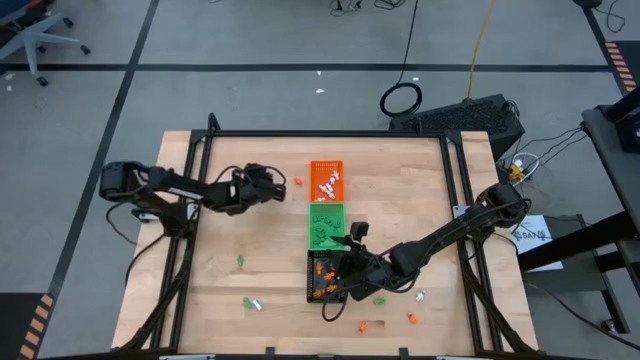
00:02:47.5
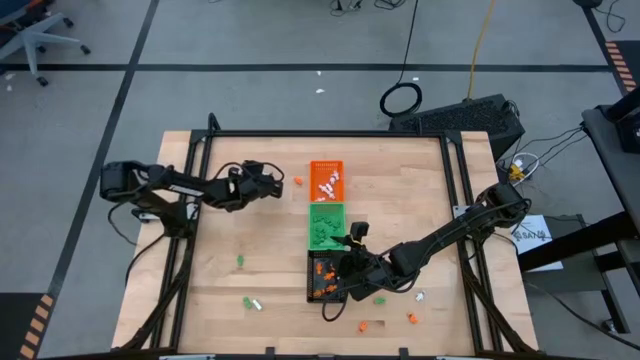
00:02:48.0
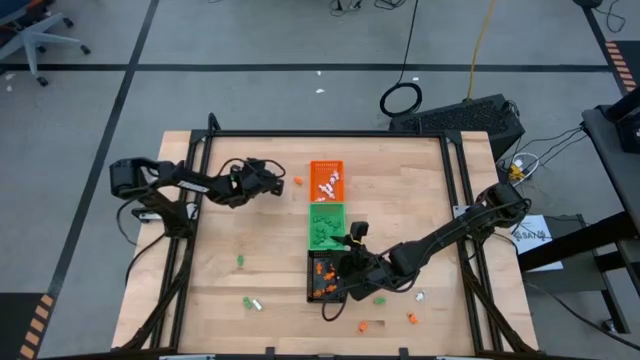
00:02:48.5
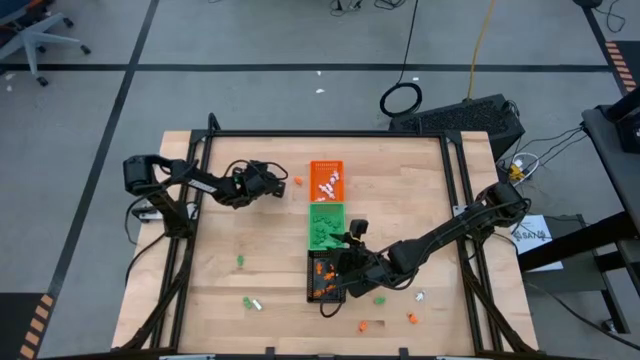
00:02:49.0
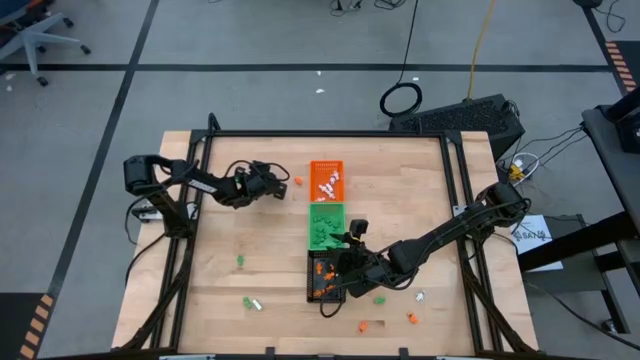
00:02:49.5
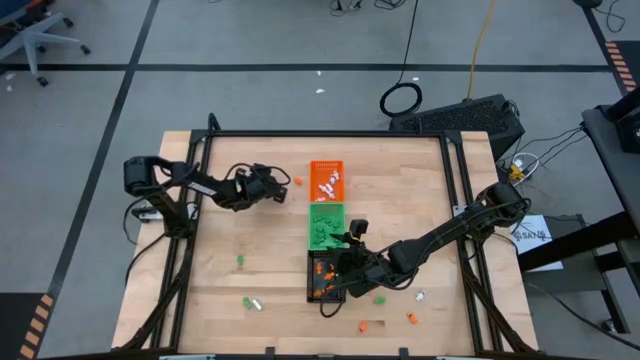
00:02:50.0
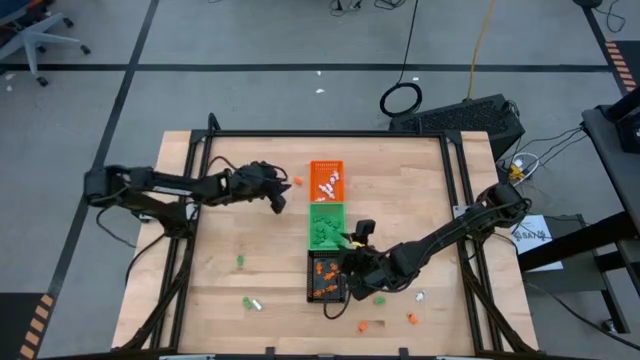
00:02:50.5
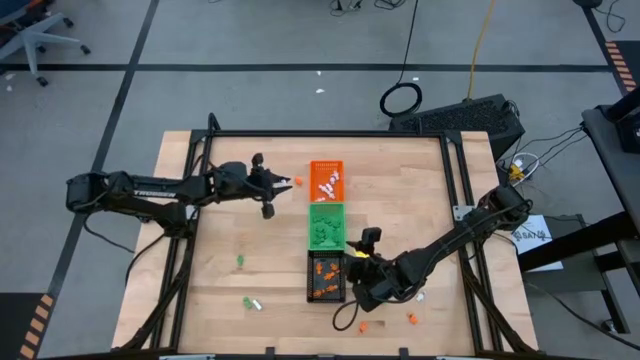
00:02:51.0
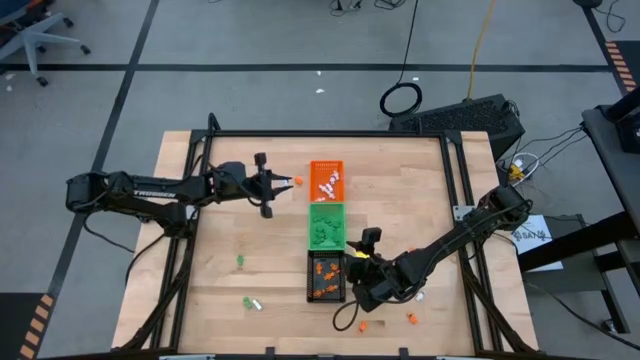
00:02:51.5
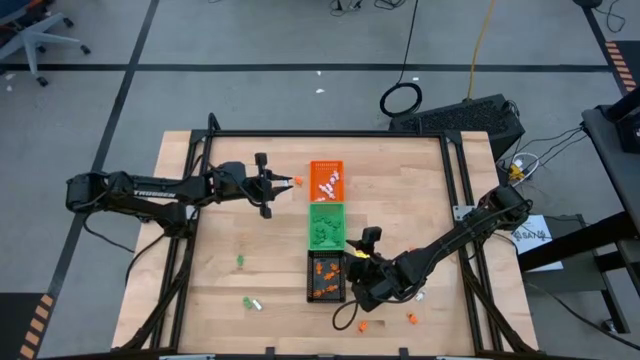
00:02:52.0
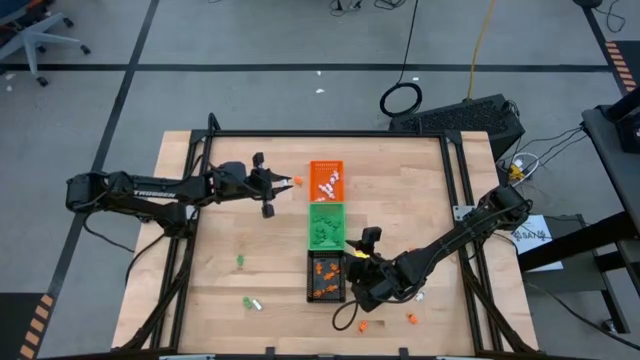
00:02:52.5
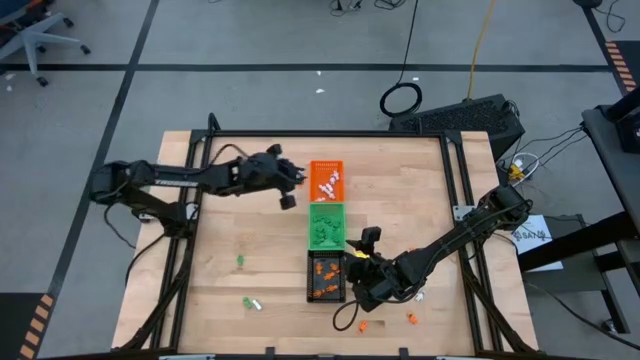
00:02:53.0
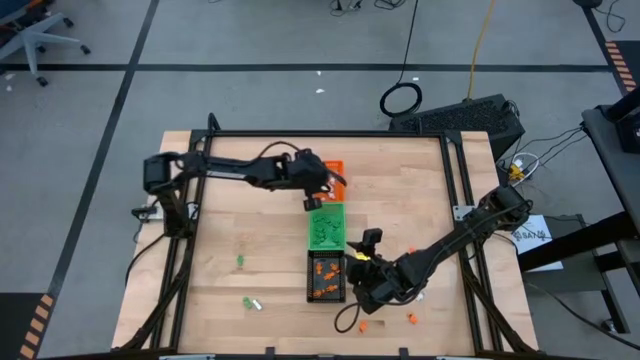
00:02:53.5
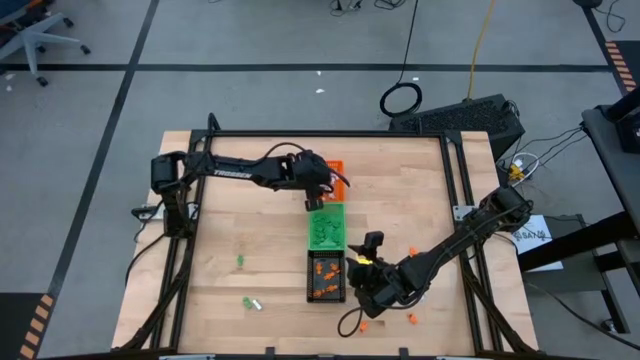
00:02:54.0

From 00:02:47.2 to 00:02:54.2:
Task: Sort Halloween decoration
Put the white skeleton toy into the orange bin

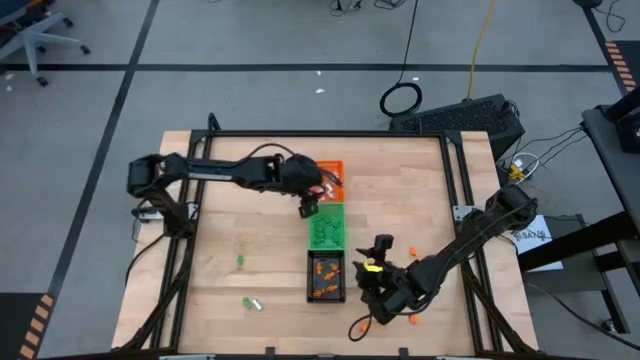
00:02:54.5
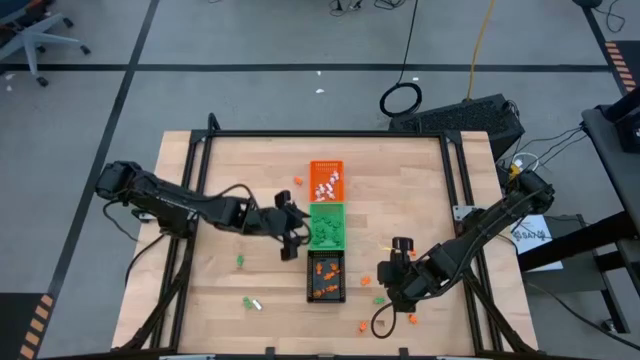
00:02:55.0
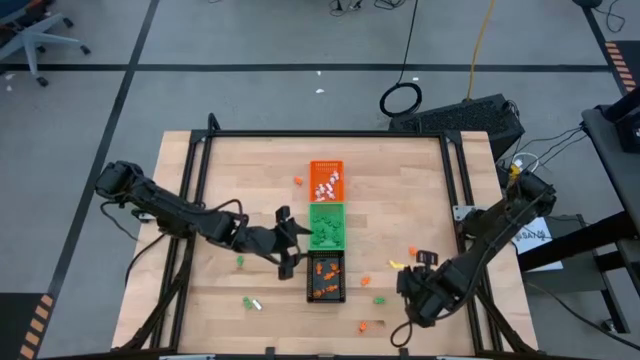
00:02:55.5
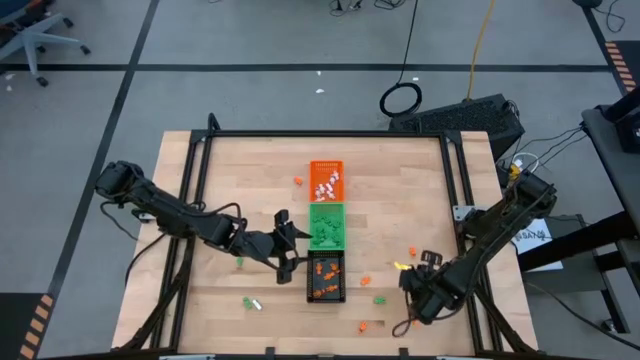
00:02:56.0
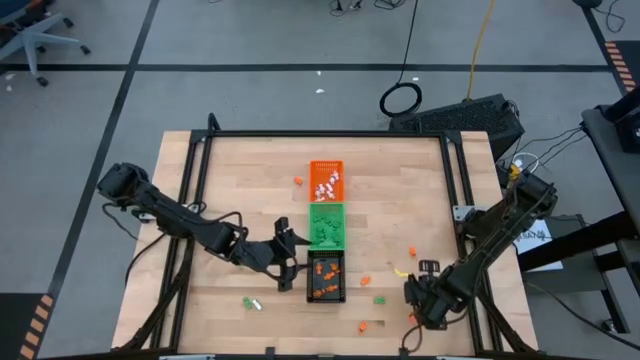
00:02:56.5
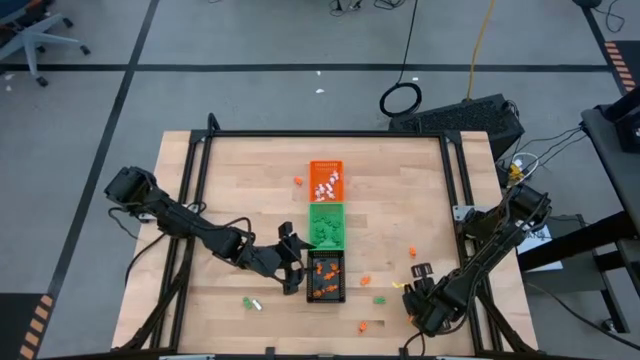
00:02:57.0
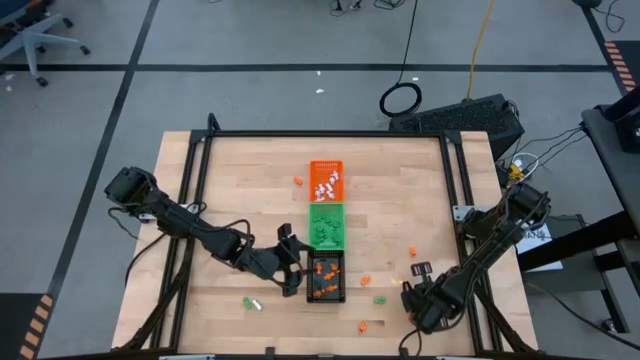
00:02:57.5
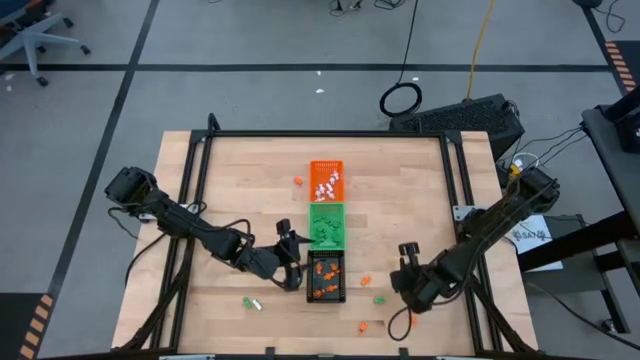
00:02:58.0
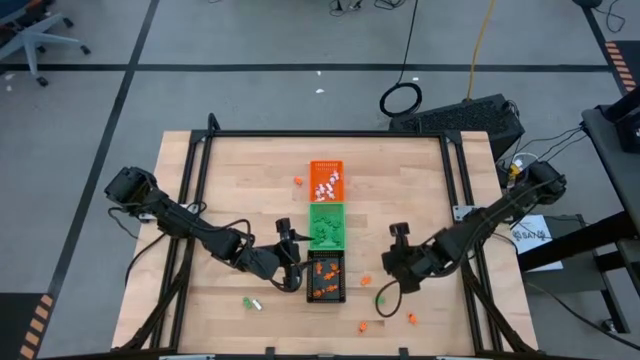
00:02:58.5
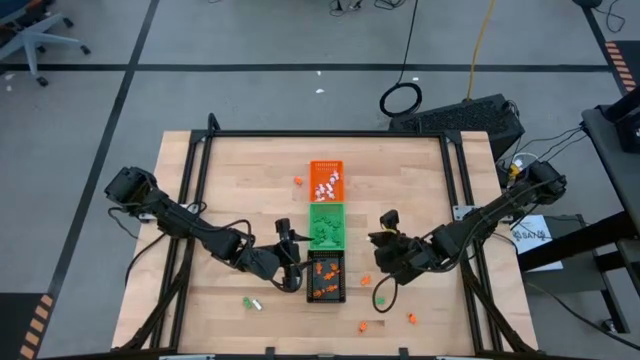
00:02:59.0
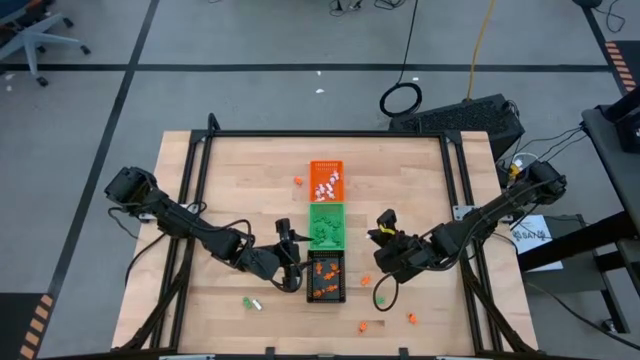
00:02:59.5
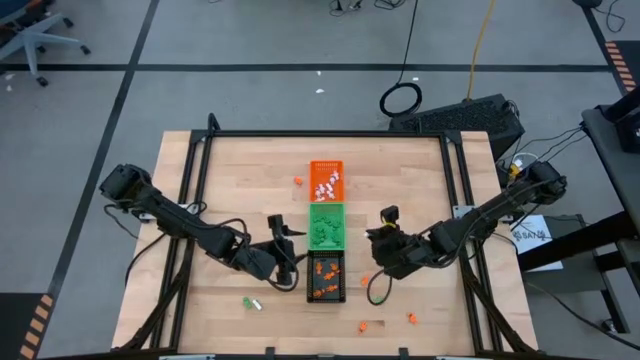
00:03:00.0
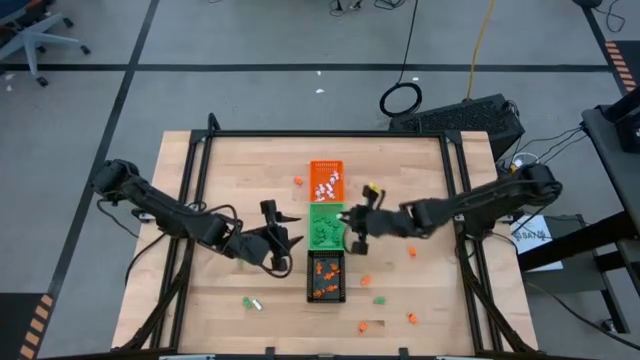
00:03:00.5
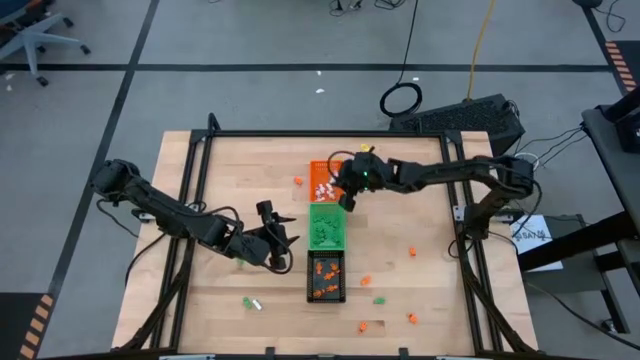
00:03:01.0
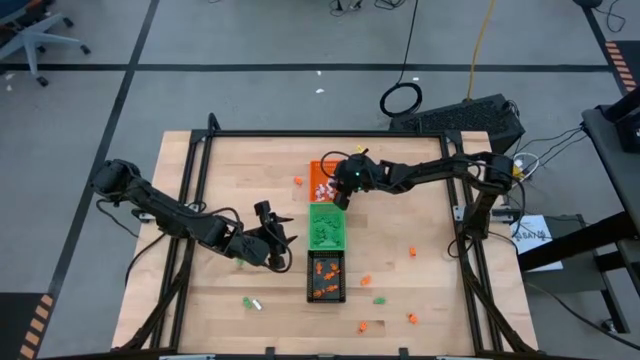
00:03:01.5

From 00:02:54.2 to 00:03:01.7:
Put the white skeleton toy into the orange bin

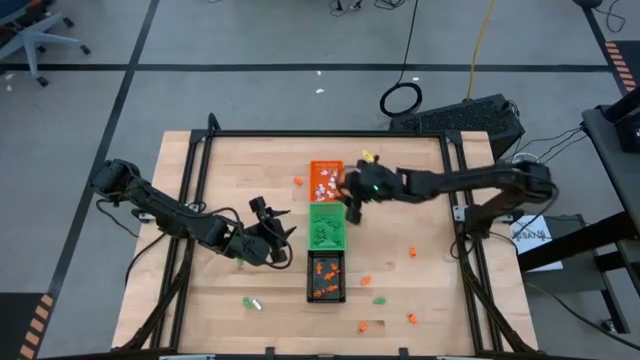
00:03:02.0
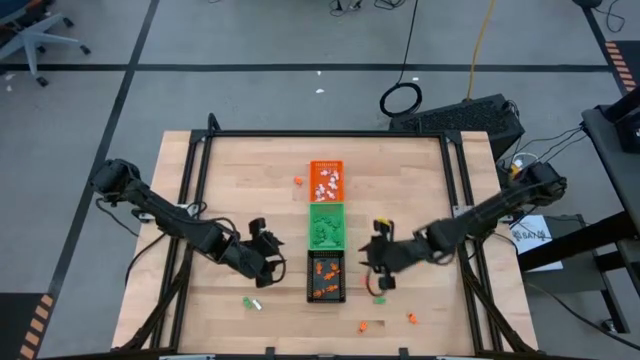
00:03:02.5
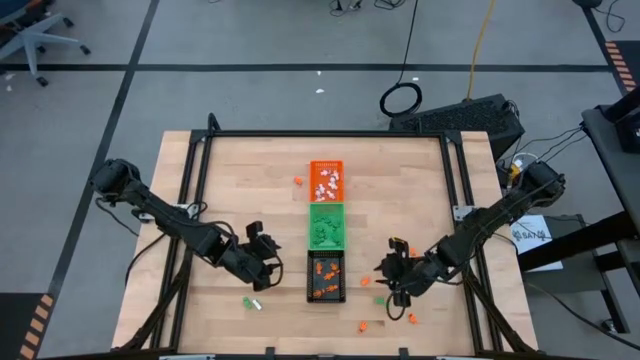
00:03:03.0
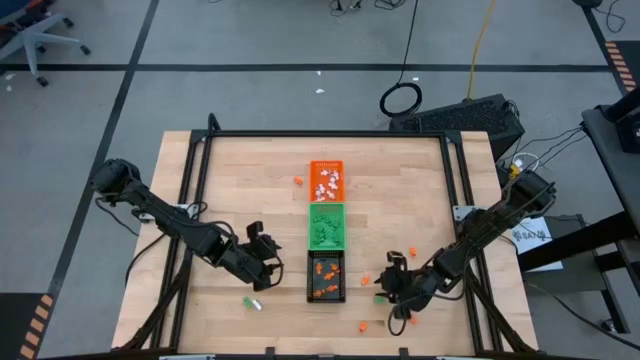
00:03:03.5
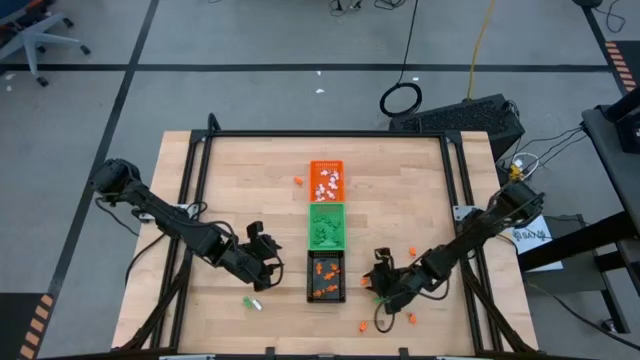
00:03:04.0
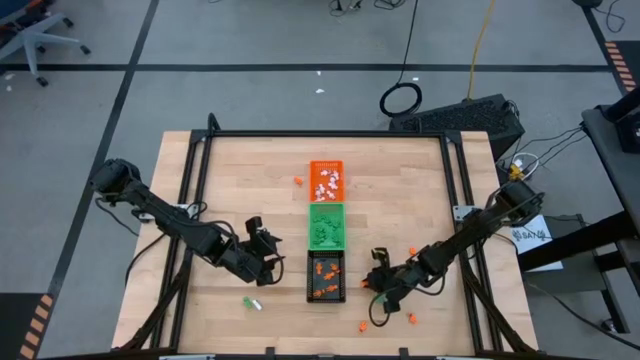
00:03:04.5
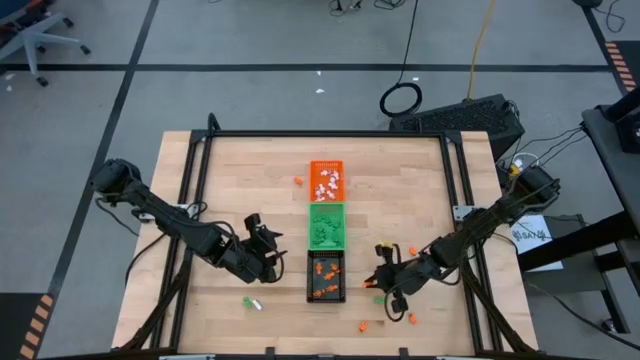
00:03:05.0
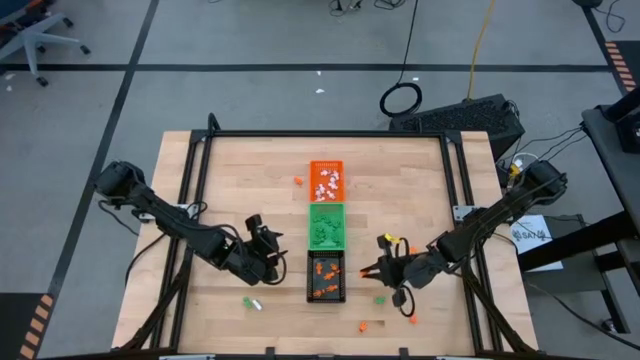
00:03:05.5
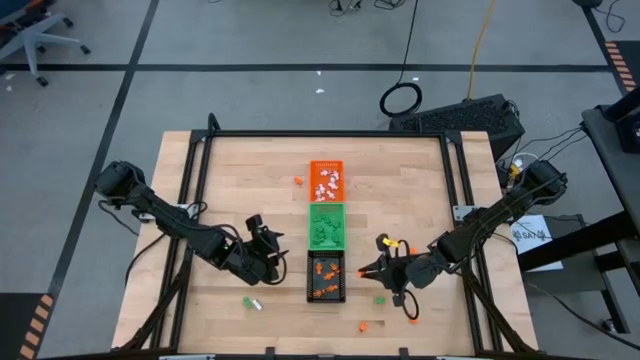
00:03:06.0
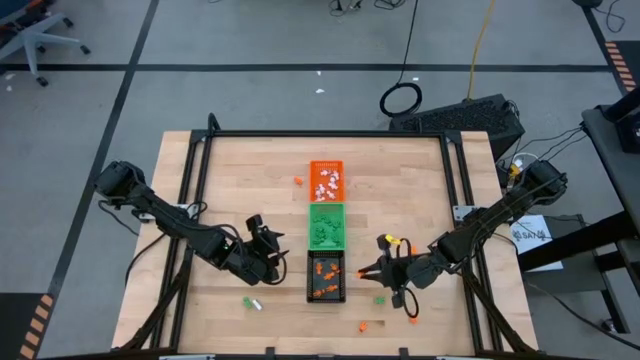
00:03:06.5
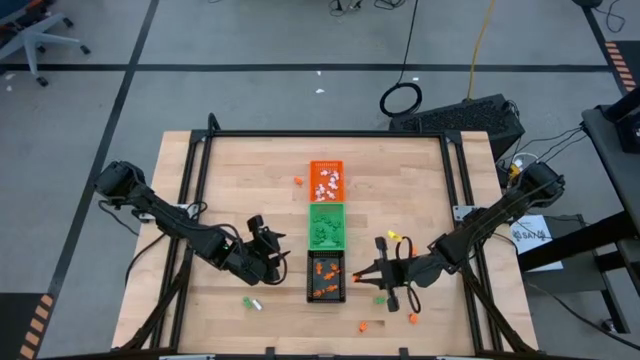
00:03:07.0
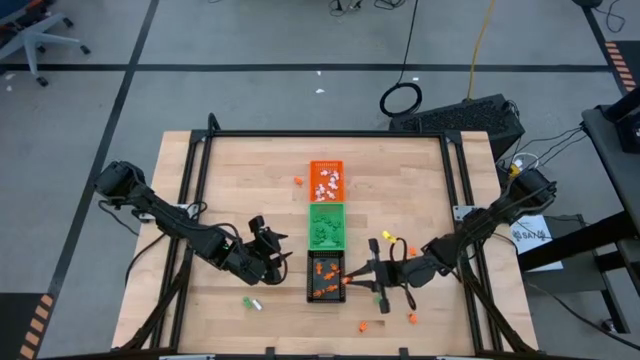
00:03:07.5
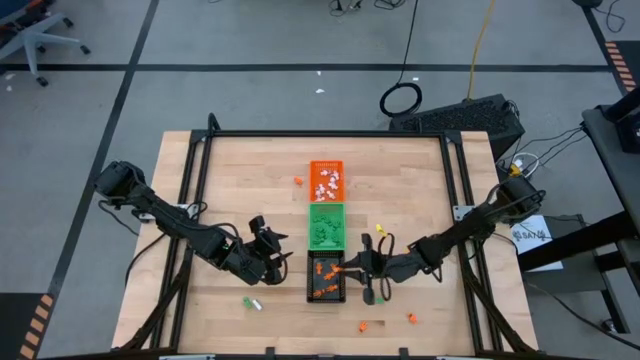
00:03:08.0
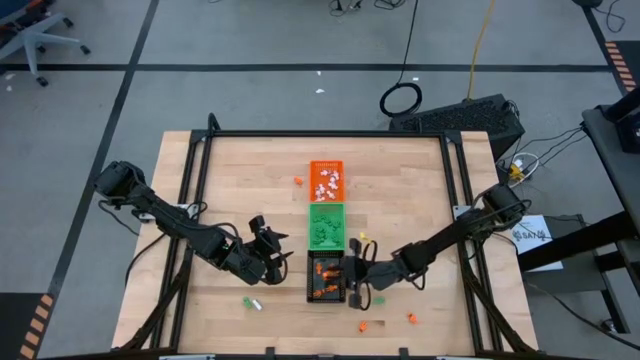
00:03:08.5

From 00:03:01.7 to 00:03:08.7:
Put the orange skeleton toy into the black bin
